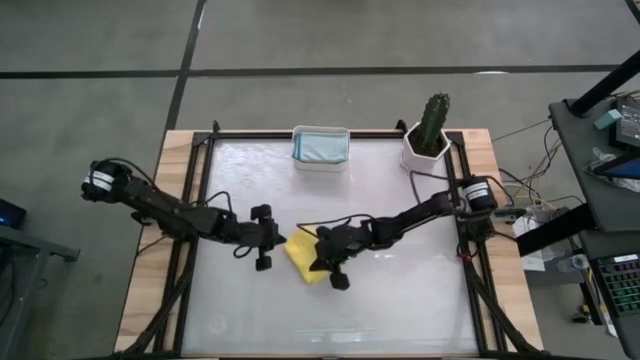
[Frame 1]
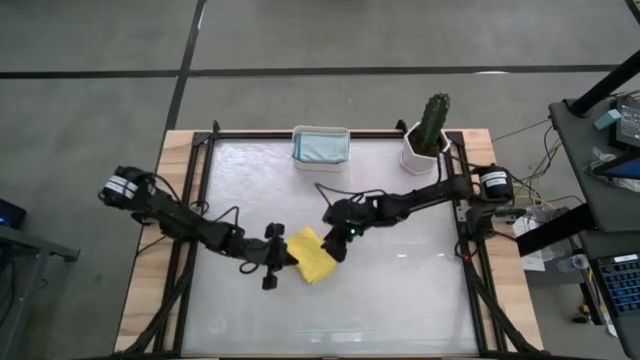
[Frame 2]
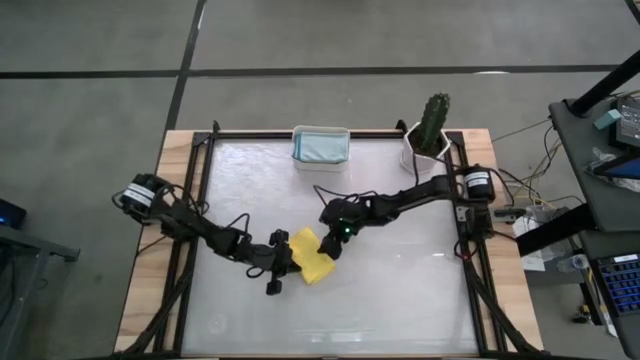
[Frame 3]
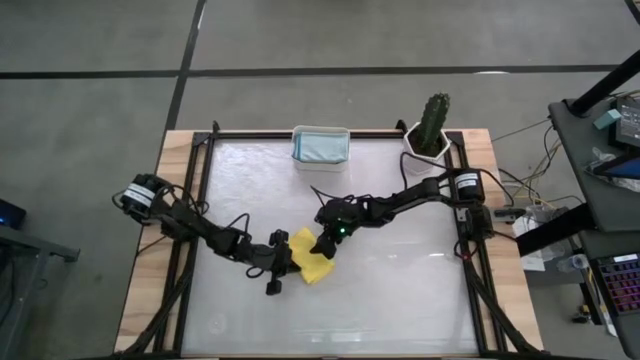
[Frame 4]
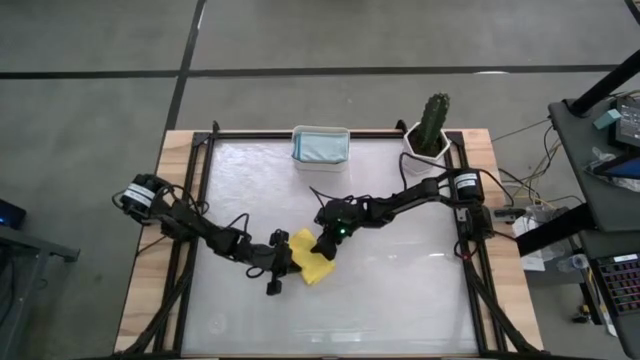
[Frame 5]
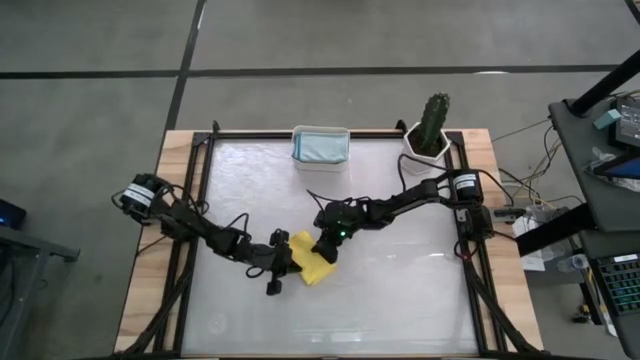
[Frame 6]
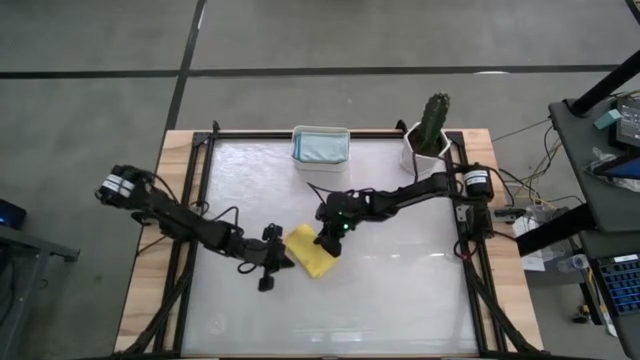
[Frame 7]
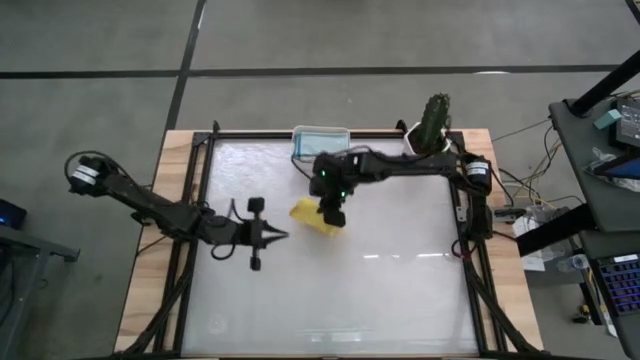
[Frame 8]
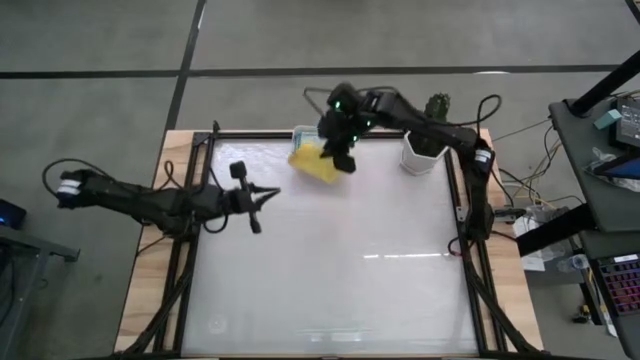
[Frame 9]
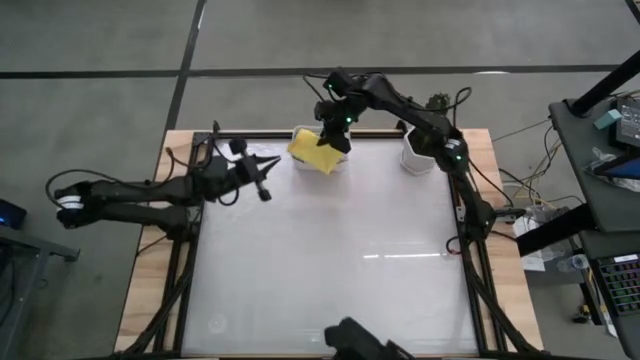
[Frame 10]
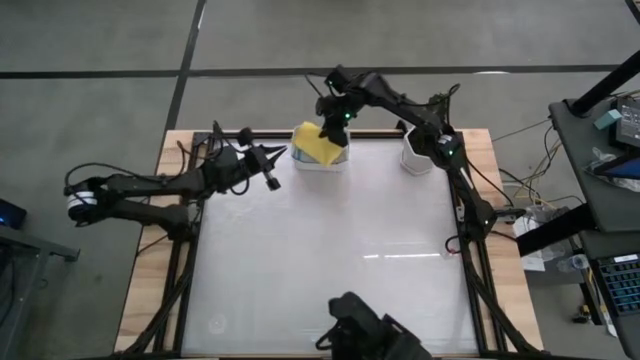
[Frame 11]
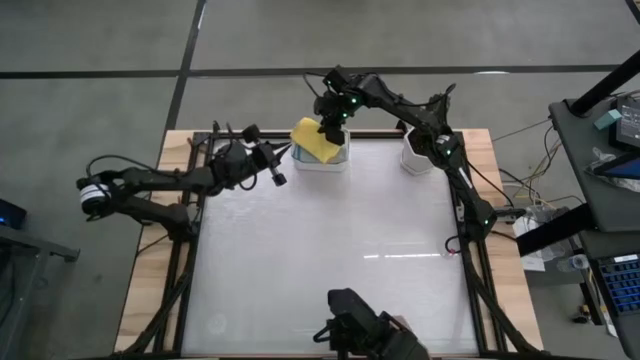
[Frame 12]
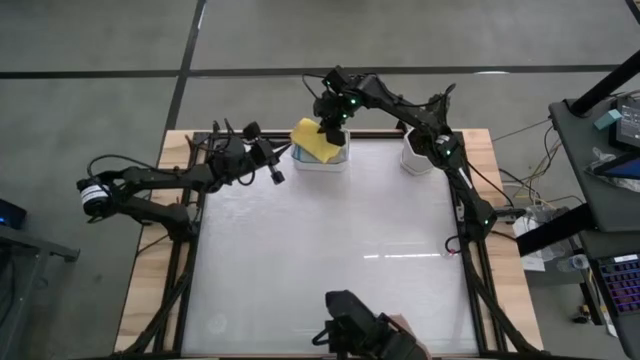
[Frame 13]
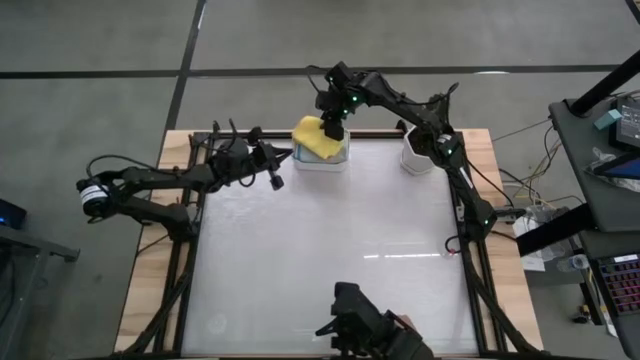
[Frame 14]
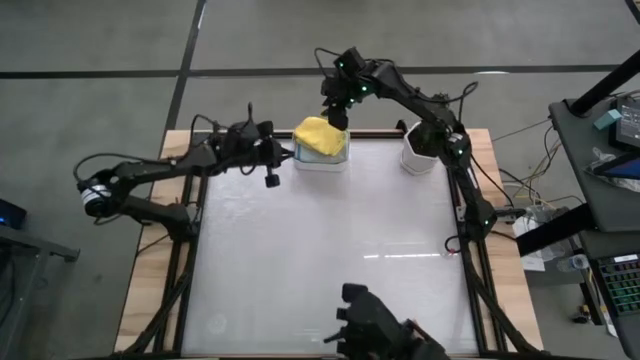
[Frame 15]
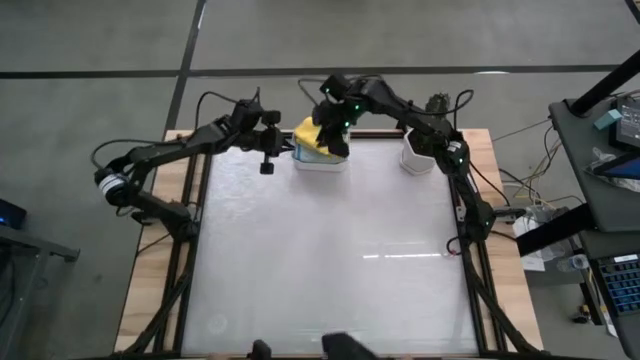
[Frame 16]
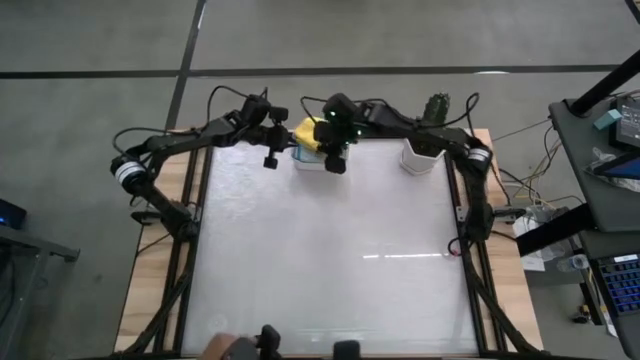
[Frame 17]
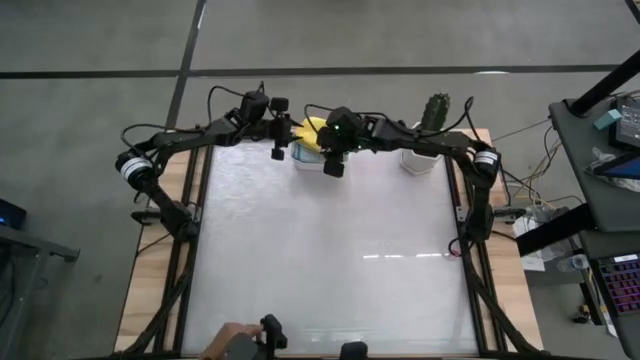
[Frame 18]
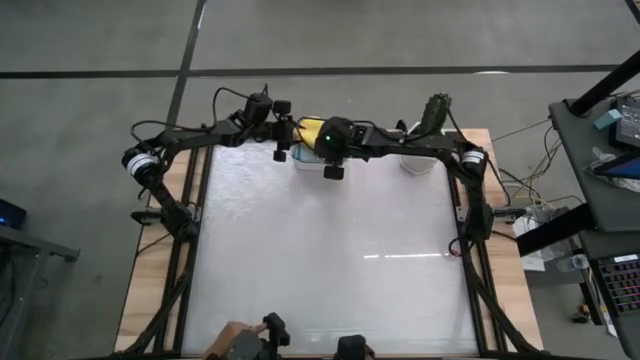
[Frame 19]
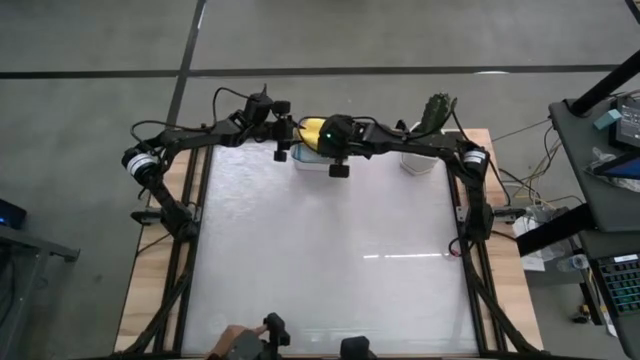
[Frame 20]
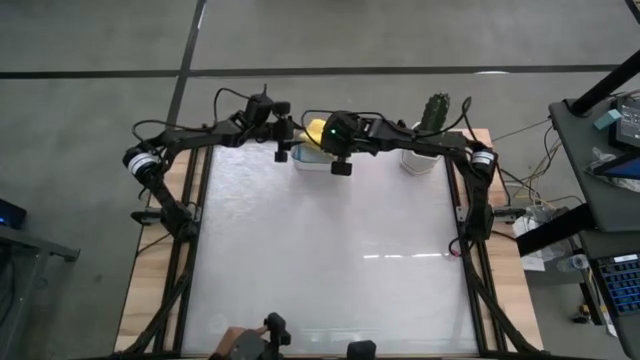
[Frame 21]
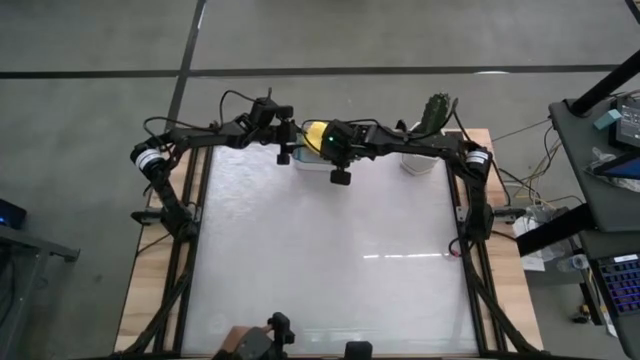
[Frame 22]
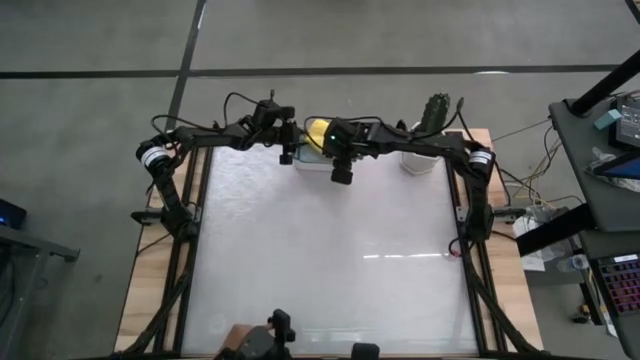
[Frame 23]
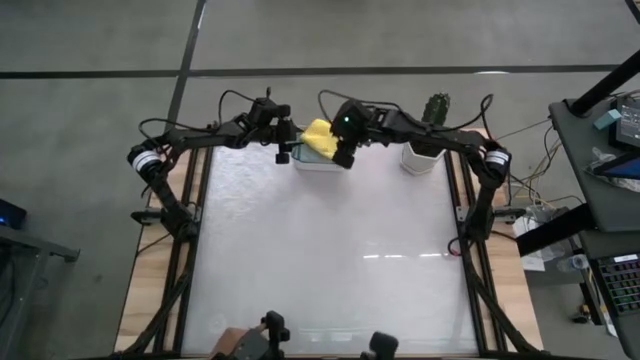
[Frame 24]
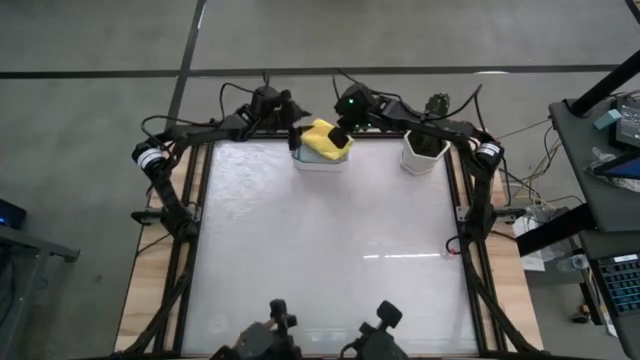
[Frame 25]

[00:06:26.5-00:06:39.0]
Task: Fold microfiber towels
Put the yellow cloth into the bin
